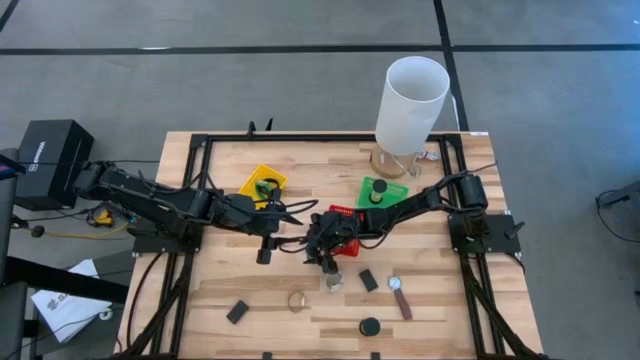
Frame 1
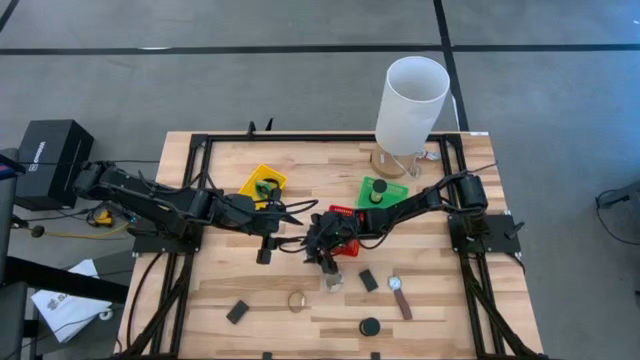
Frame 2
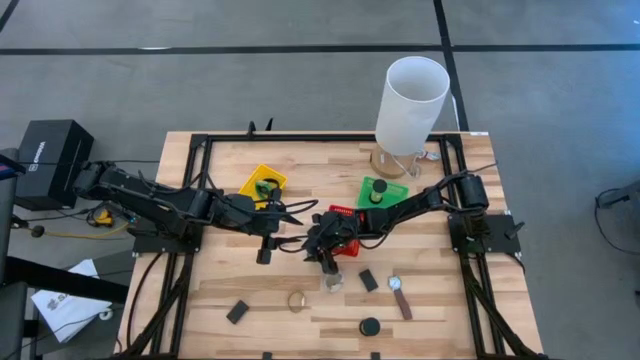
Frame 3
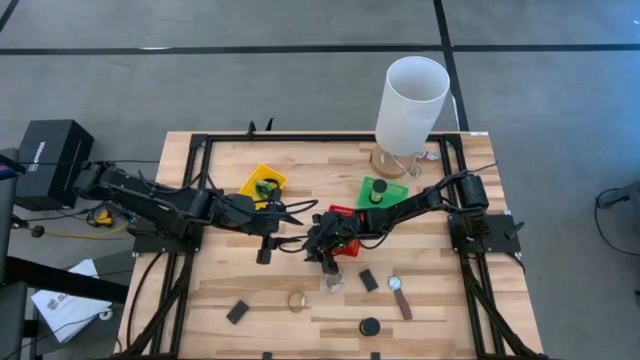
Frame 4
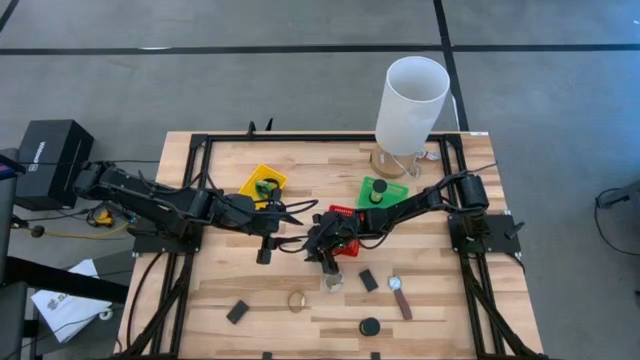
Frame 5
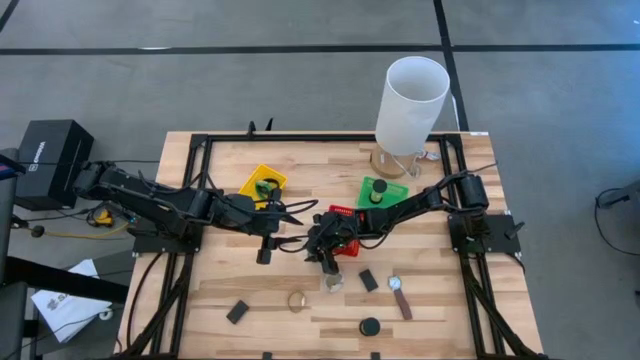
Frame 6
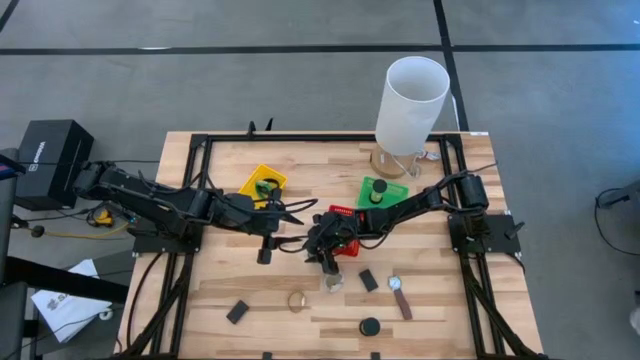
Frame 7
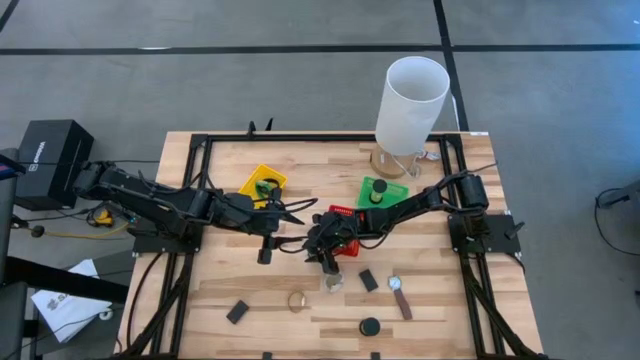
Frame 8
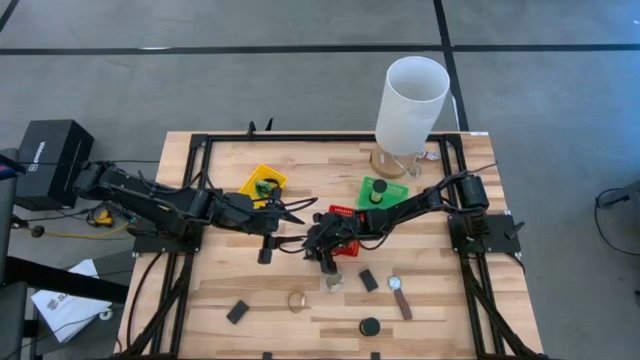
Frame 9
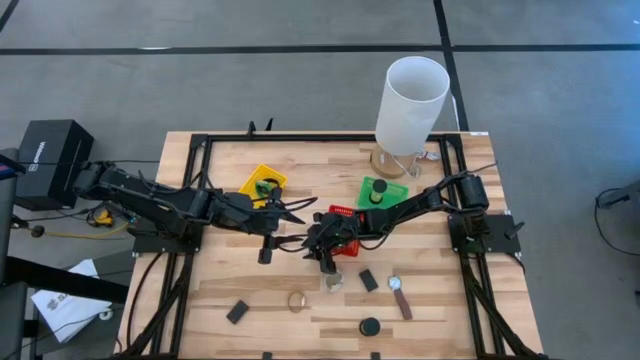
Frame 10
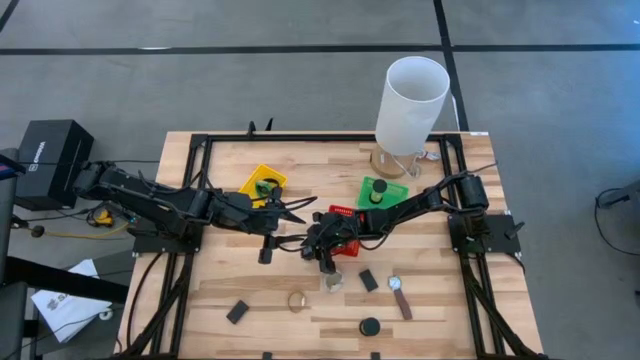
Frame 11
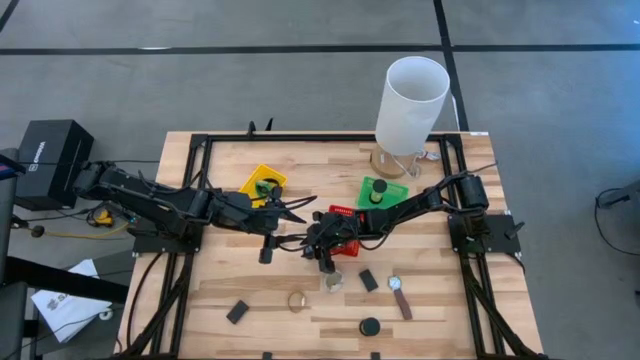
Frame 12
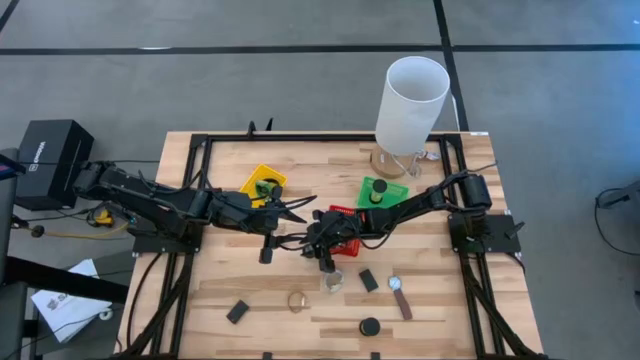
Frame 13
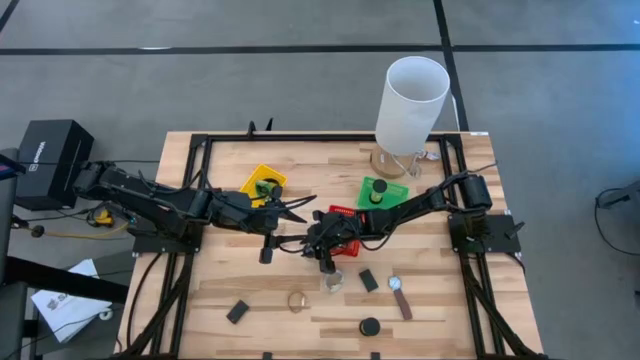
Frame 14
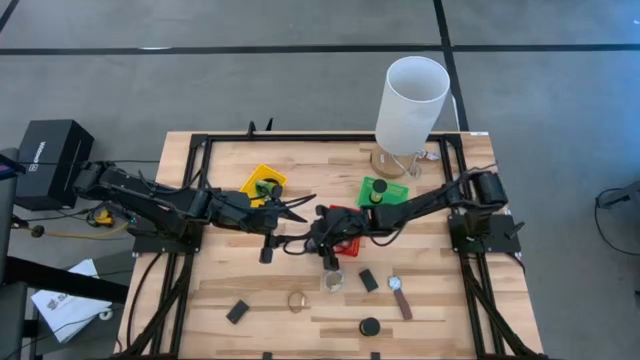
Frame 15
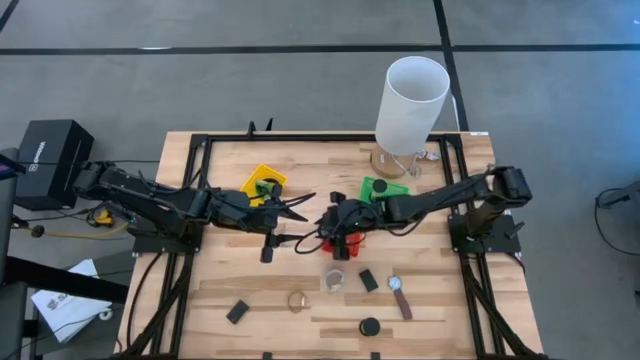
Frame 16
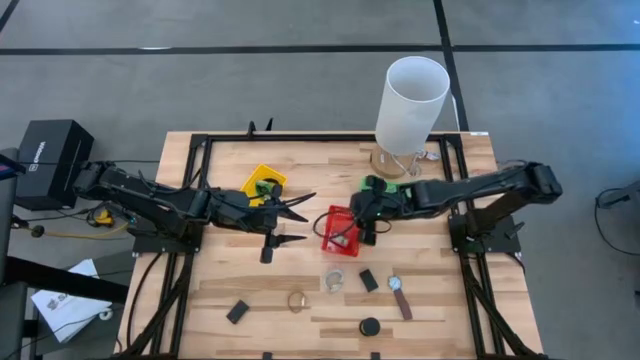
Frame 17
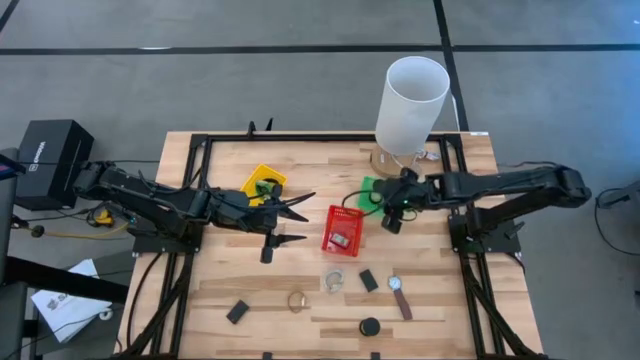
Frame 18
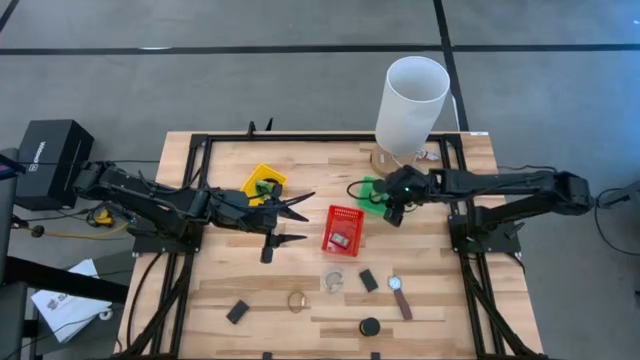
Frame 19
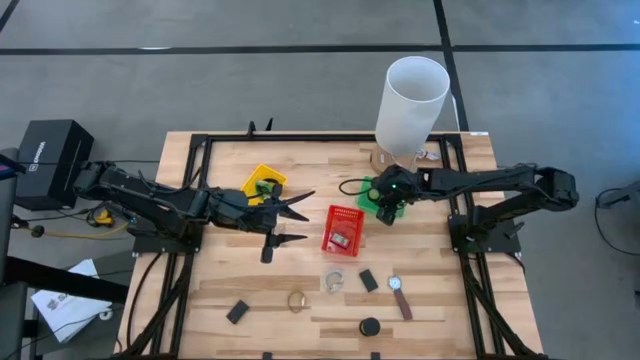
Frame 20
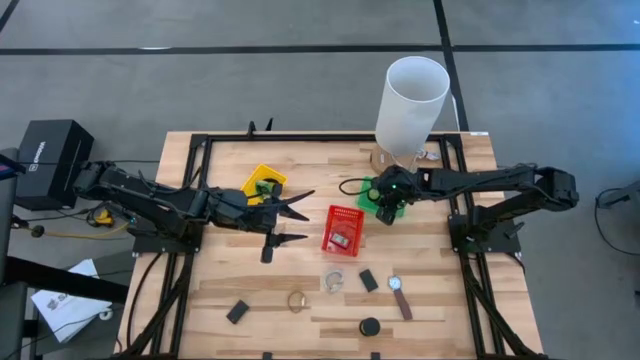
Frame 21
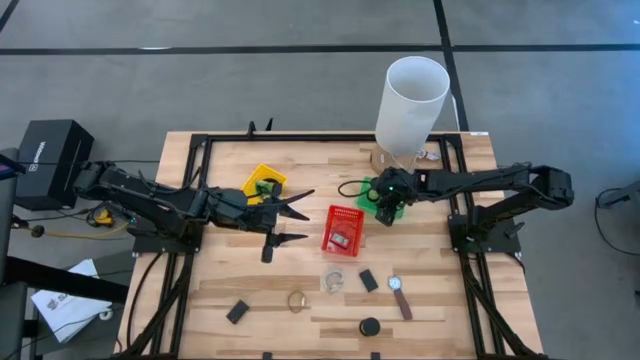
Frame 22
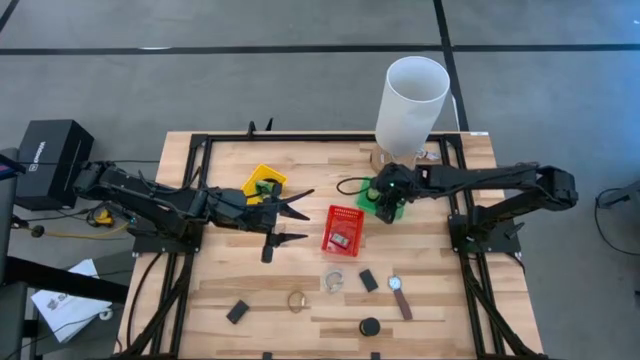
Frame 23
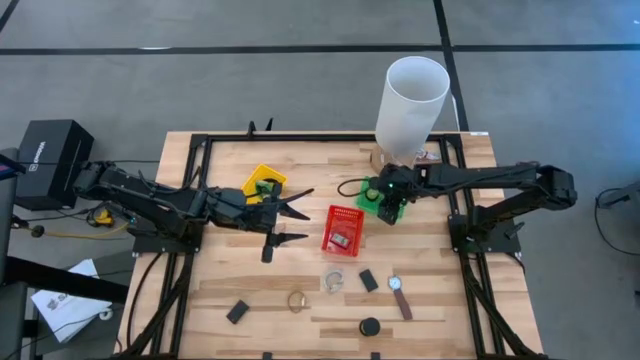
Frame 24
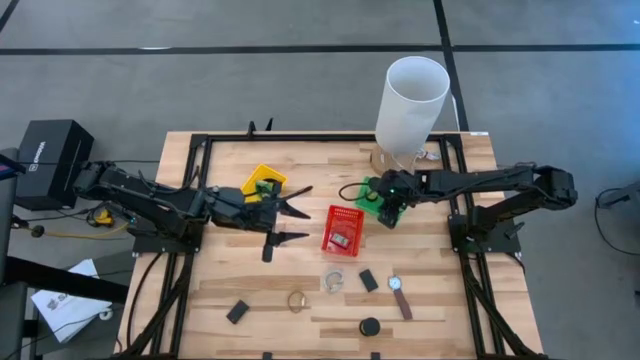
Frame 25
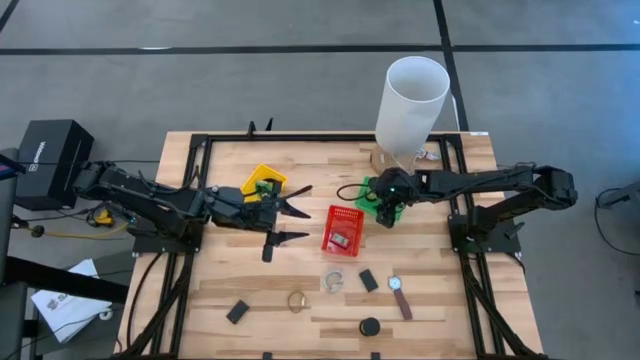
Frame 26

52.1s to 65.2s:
Task: Pick & Place Office items
Put the top left black hourglass into the green bin

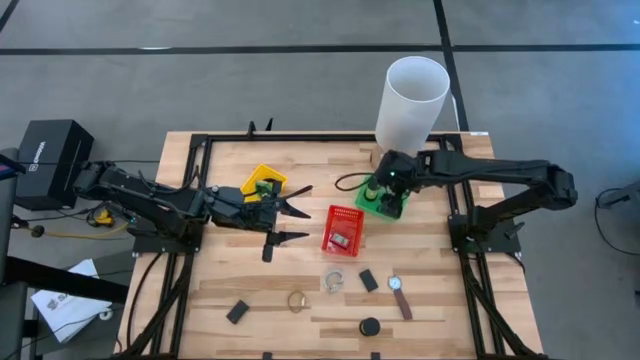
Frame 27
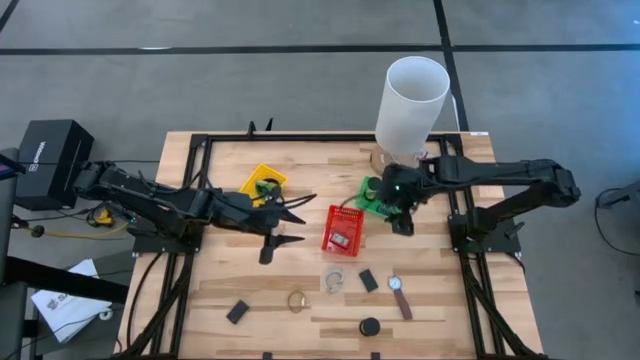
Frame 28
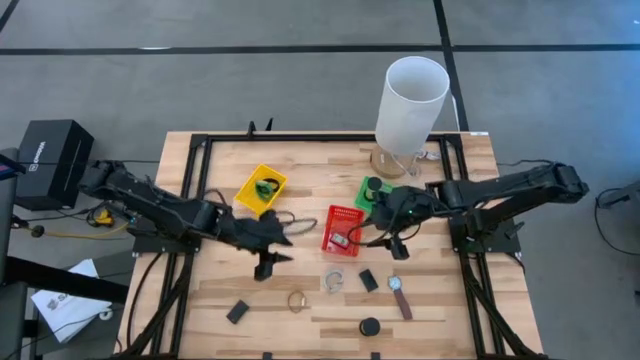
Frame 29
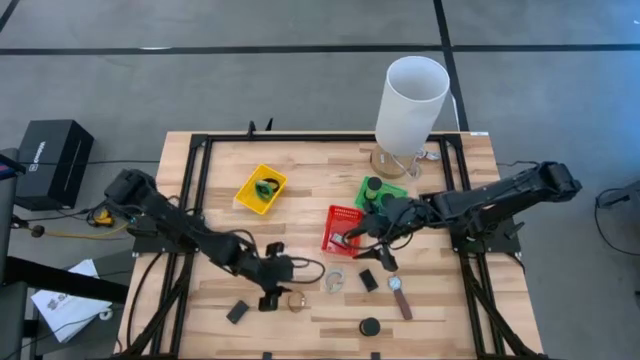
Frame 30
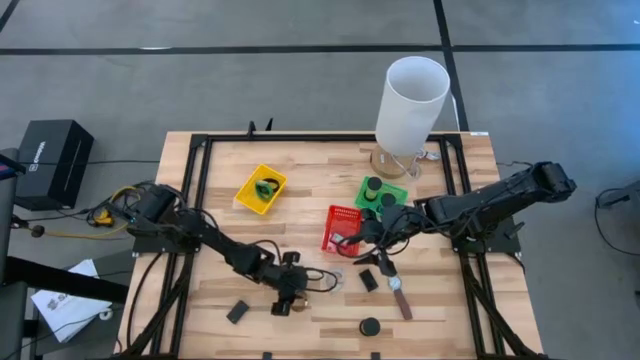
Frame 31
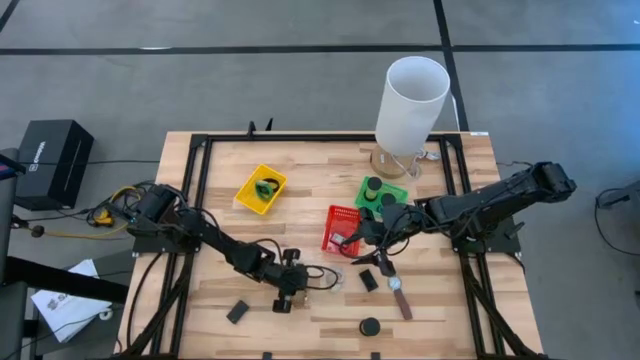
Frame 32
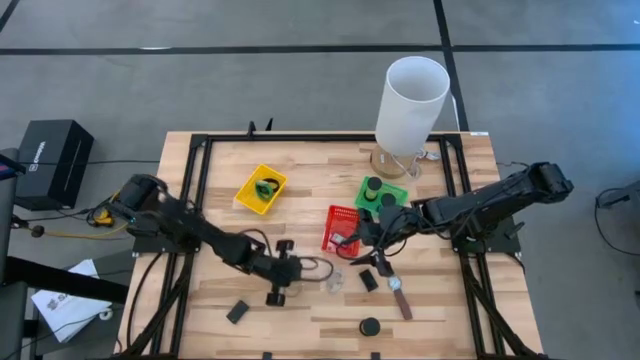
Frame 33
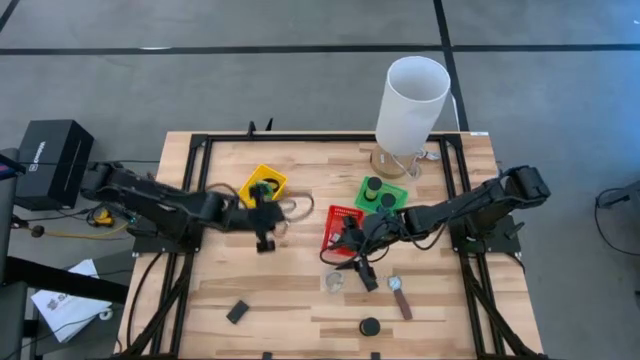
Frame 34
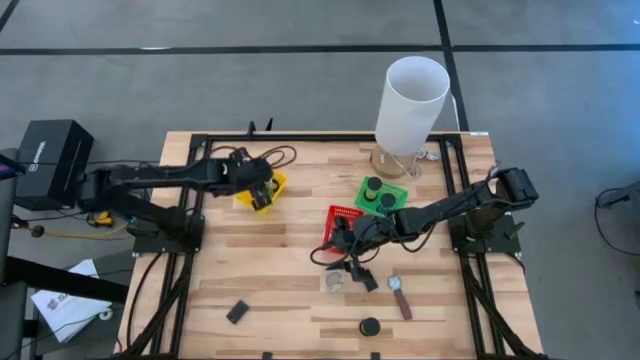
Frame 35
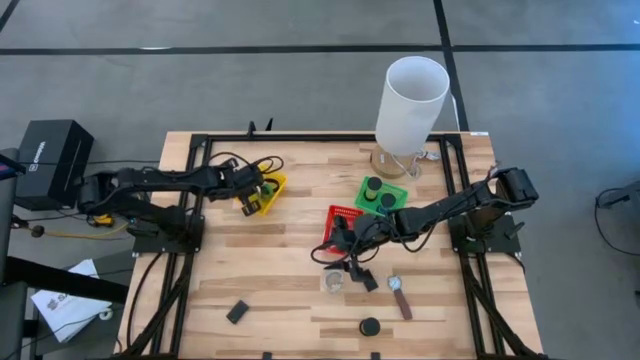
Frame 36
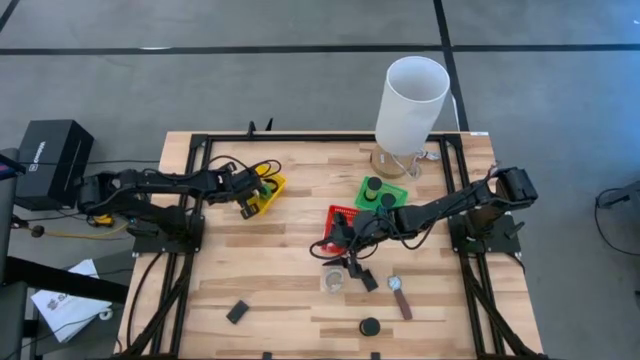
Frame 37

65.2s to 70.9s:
Put the gold wristwatch into the yellow bin

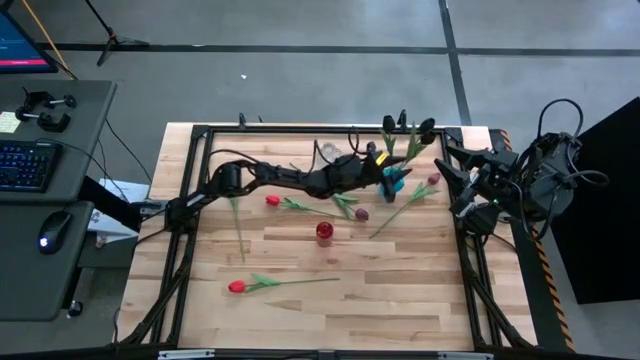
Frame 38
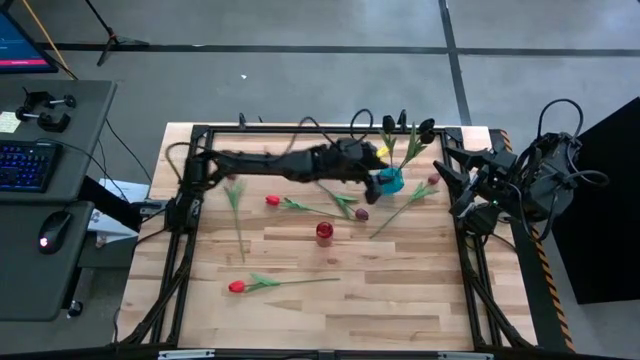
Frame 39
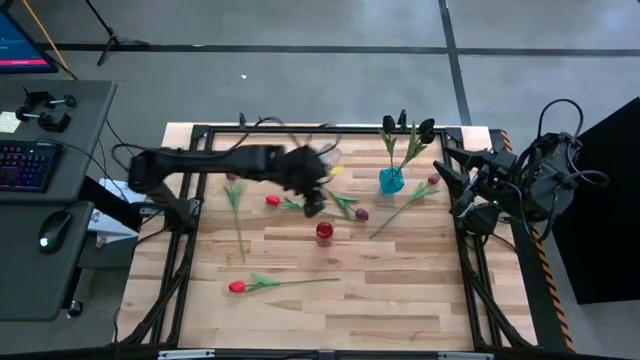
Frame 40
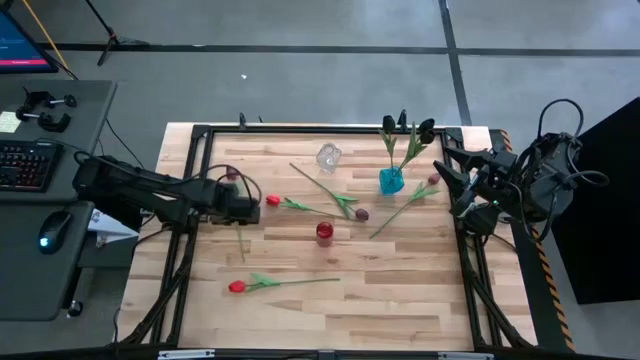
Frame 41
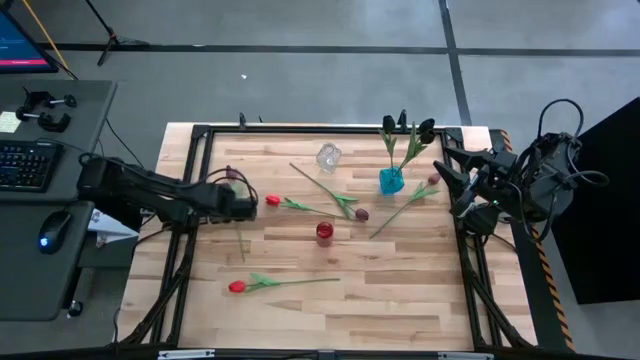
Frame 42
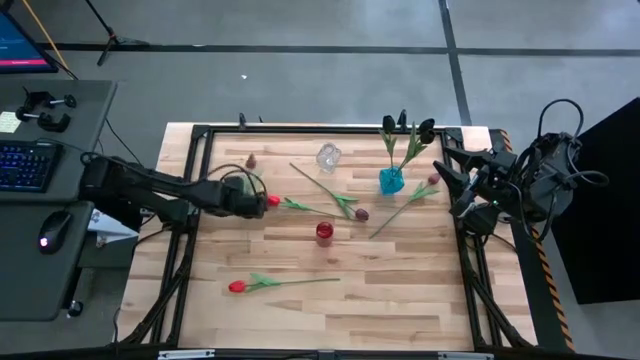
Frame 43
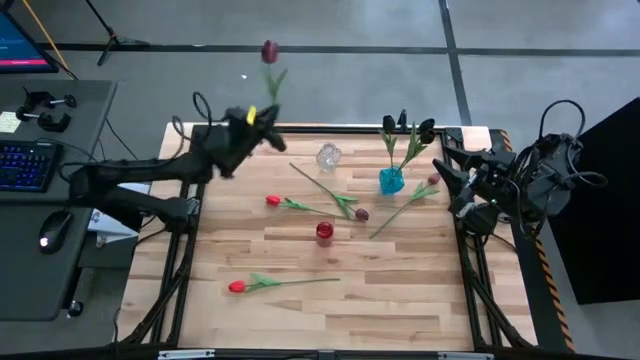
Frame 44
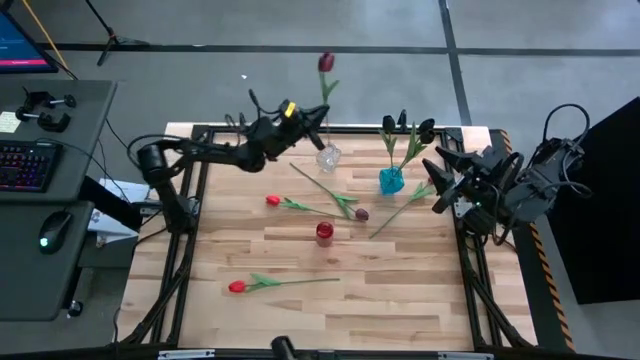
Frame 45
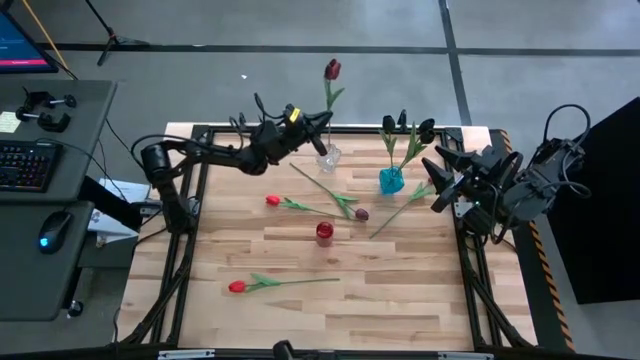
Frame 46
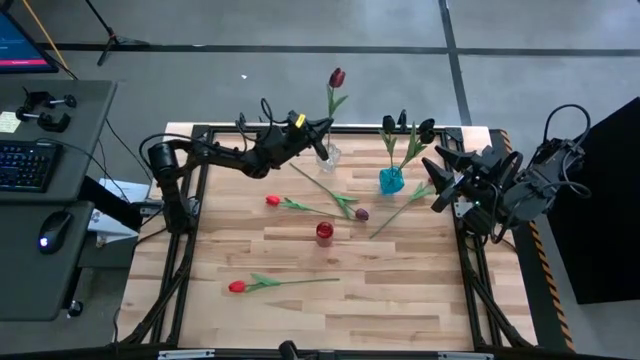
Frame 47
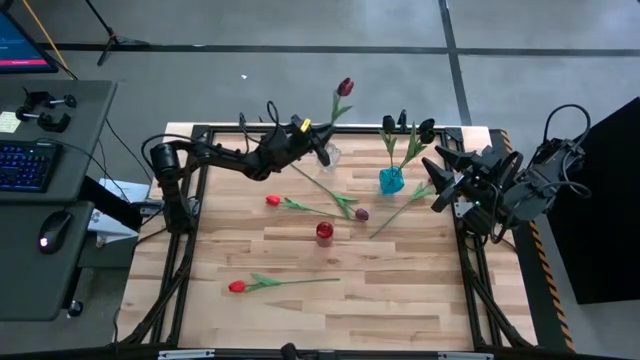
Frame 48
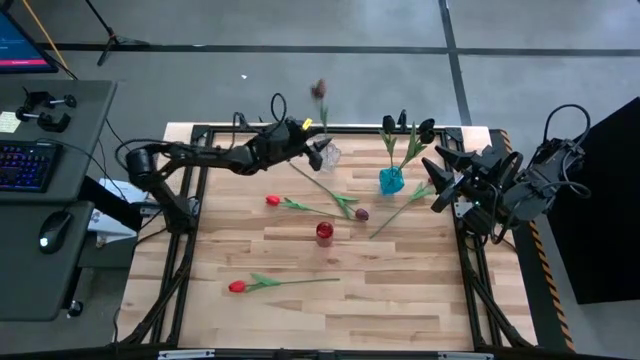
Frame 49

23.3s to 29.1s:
Task: Sort flowers into vase by color
Put the left dark red flower into the transparent vase
